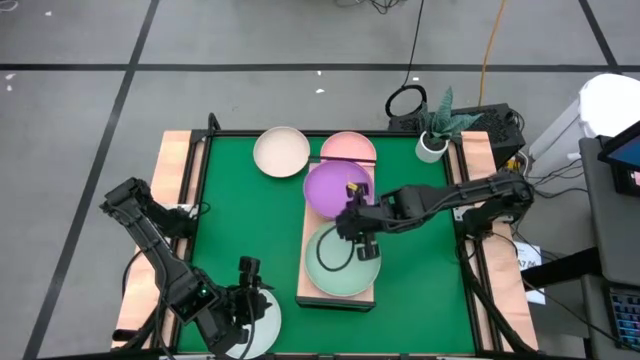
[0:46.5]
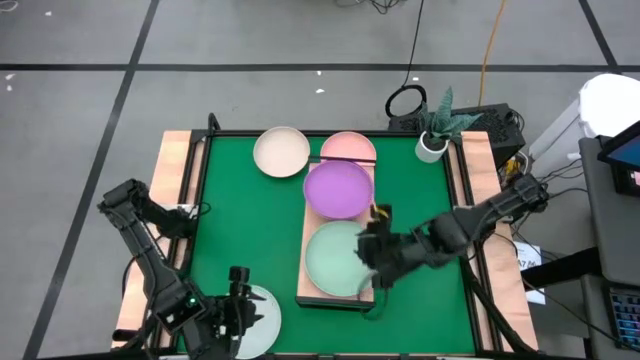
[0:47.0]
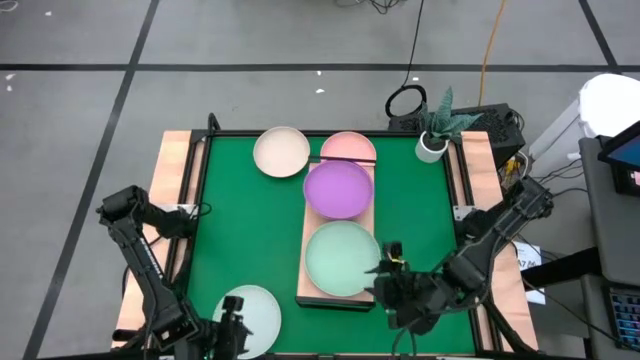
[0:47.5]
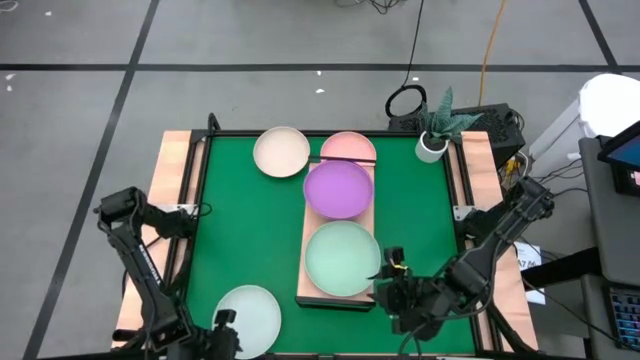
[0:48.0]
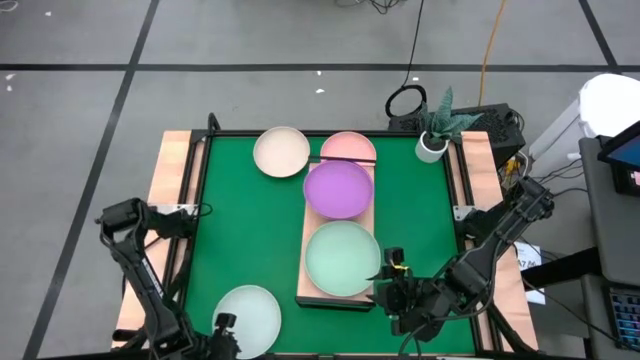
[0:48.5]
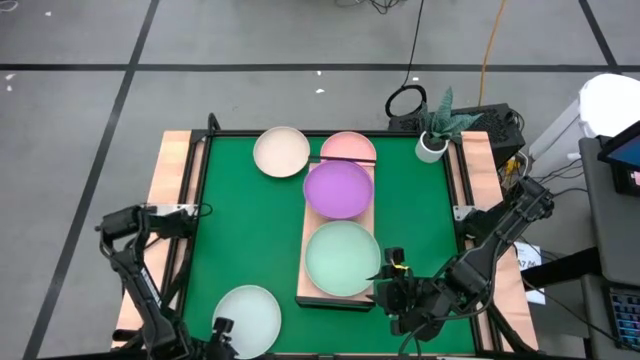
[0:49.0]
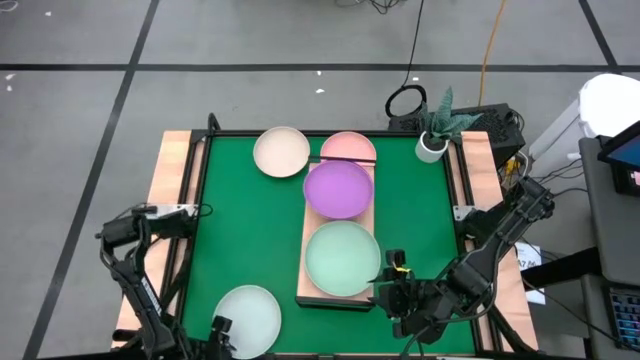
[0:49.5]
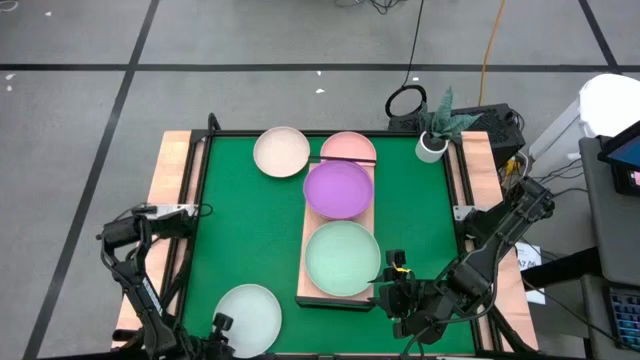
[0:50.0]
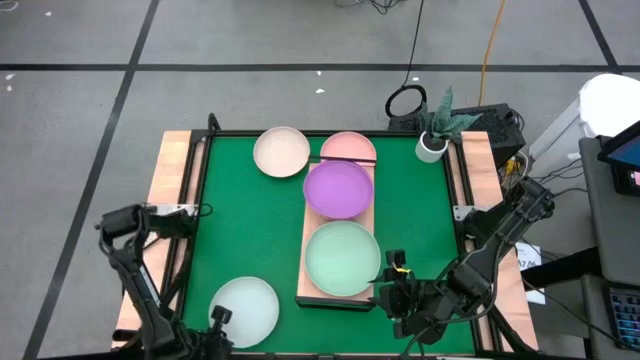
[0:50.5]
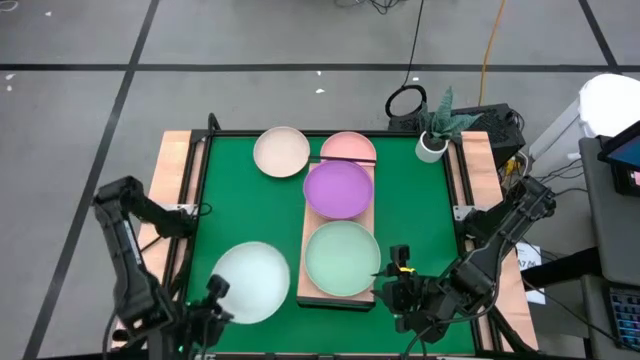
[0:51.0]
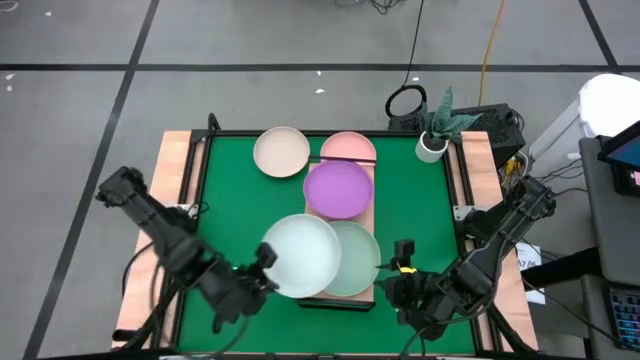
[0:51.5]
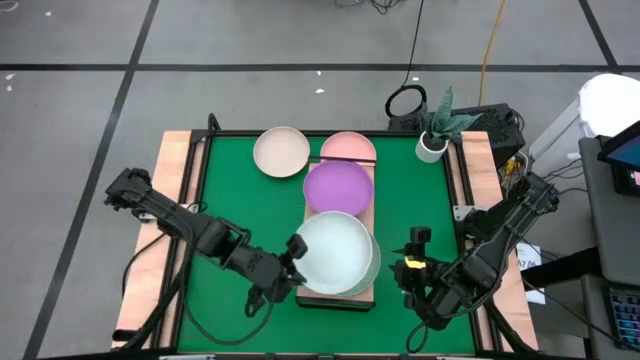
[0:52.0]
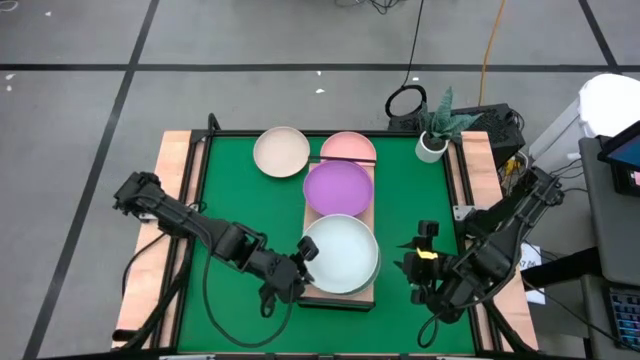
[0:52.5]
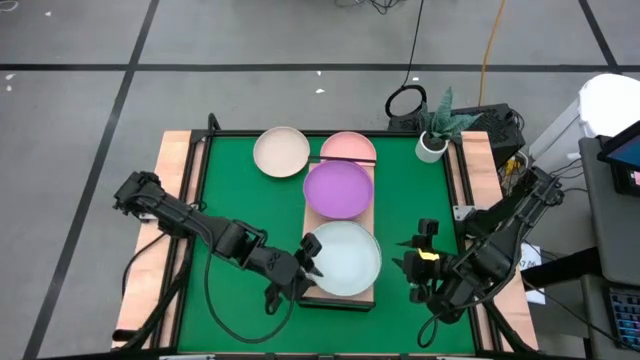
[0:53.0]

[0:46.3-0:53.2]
Task: Place and stack plates onto a shelf
Stack the grey plate on top of the light green plate on the shelf

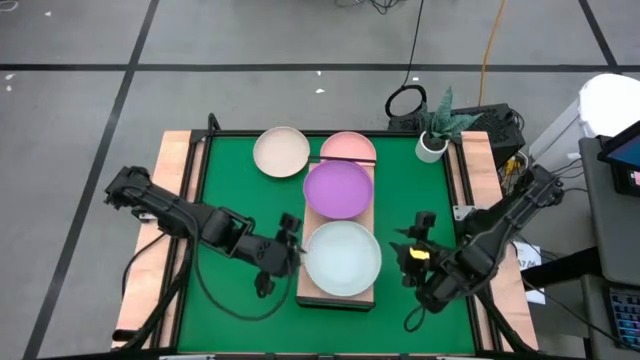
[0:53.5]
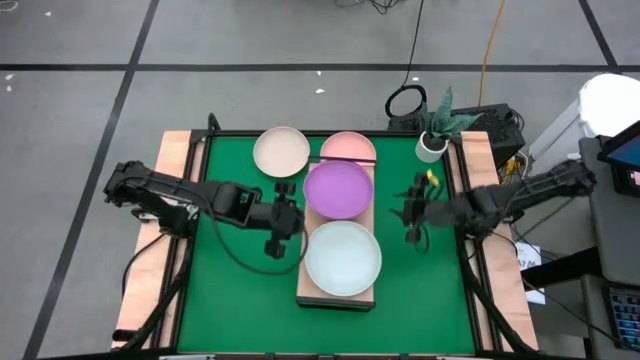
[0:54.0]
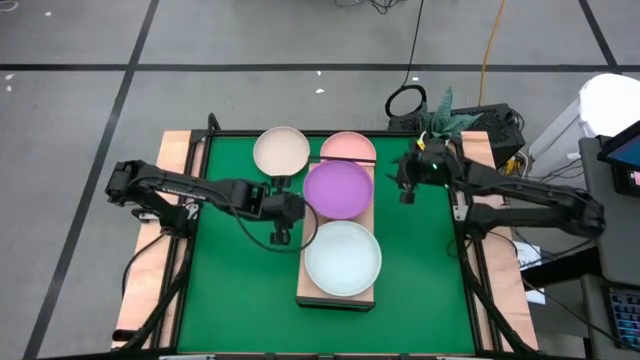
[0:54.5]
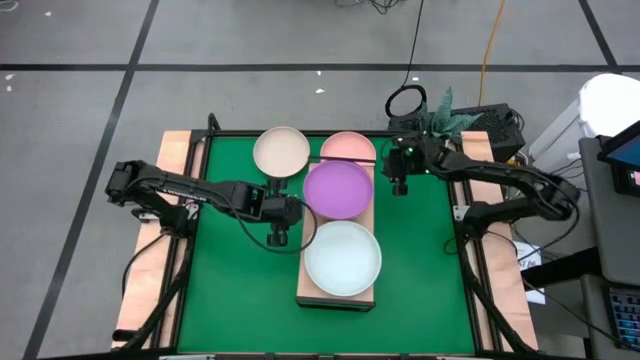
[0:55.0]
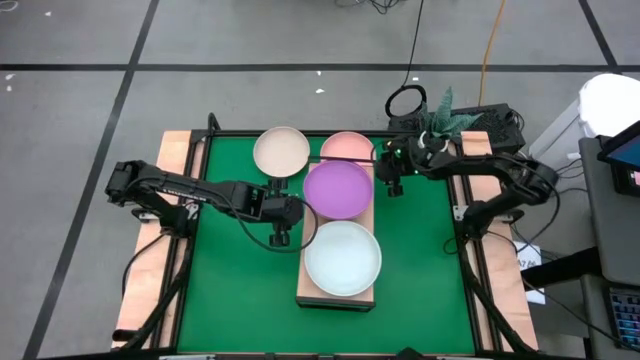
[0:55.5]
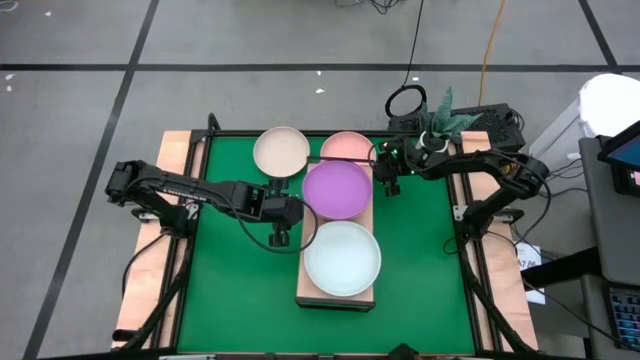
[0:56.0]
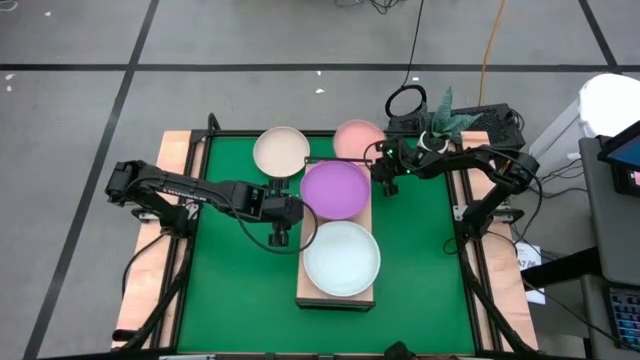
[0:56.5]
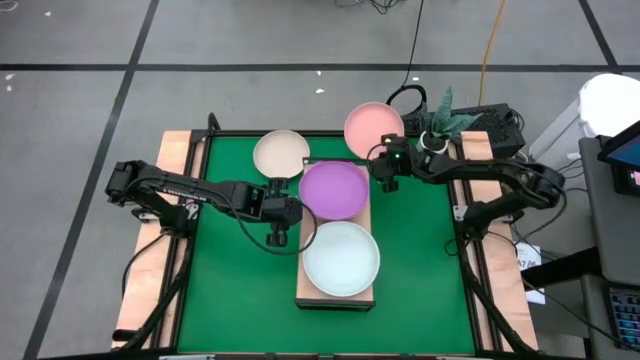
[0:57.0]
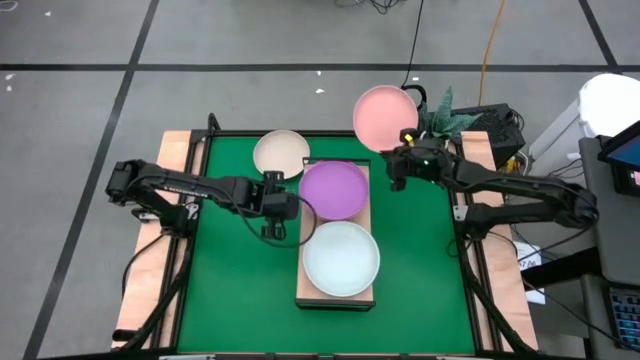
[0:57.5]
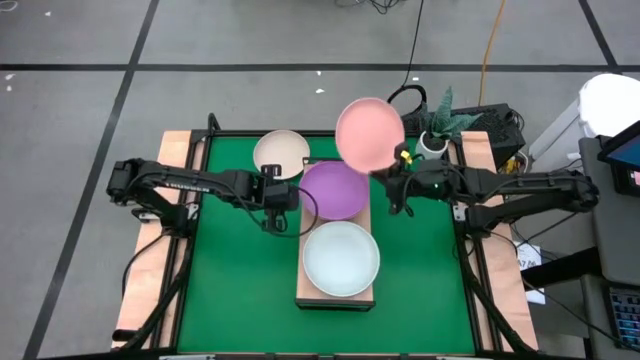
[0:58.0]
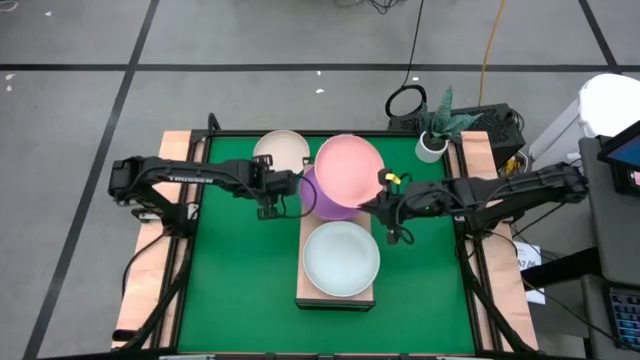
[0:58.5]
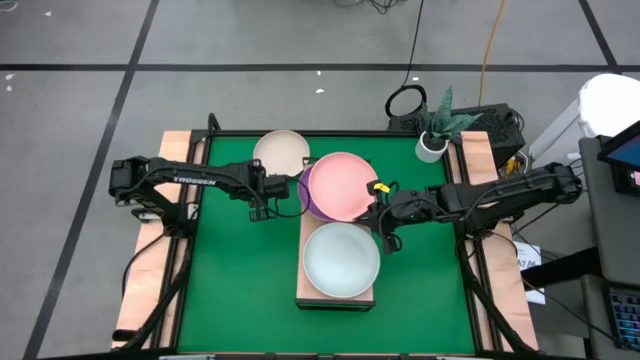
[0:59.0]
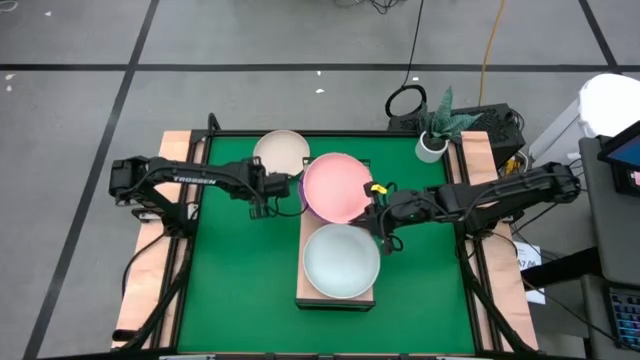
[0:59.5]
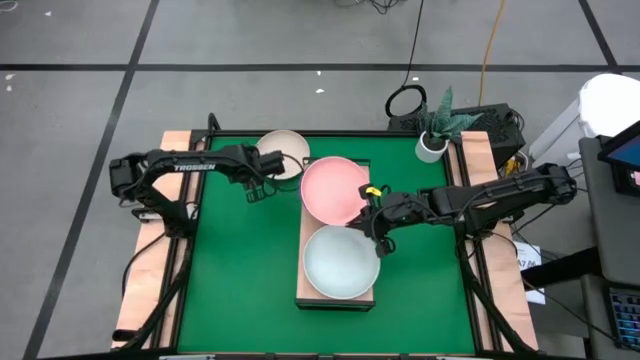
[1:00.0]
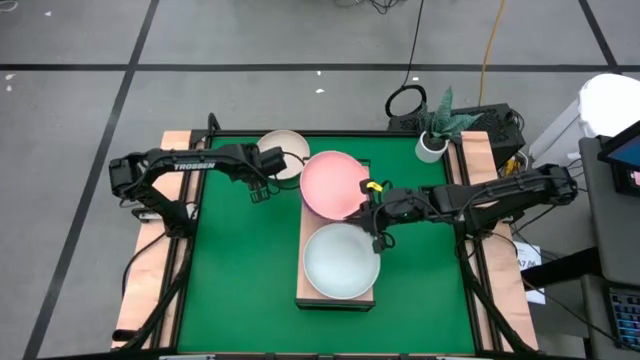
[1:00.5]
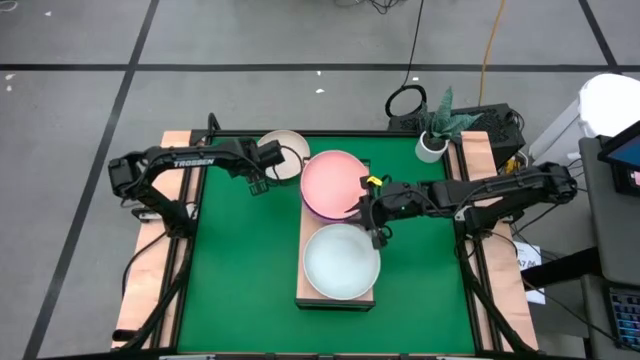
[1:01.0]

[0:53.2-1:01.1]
Stack the light orange plate on top of the purple plate on the shelf

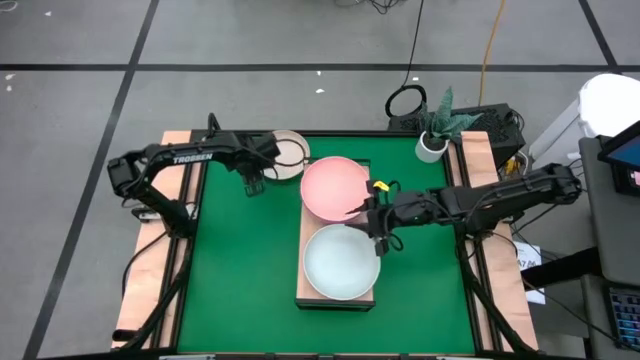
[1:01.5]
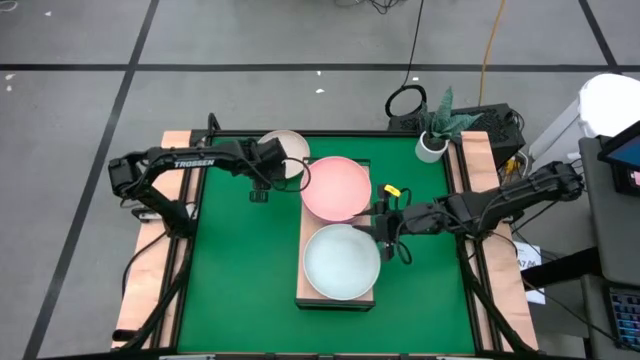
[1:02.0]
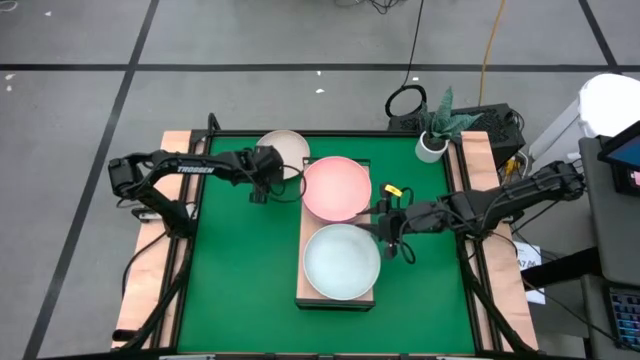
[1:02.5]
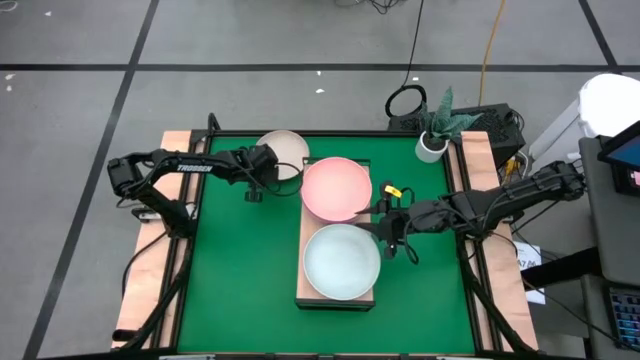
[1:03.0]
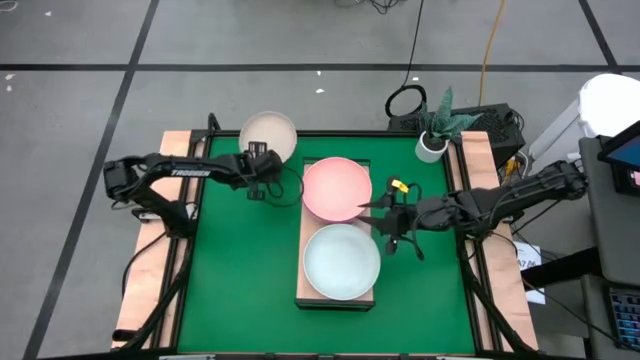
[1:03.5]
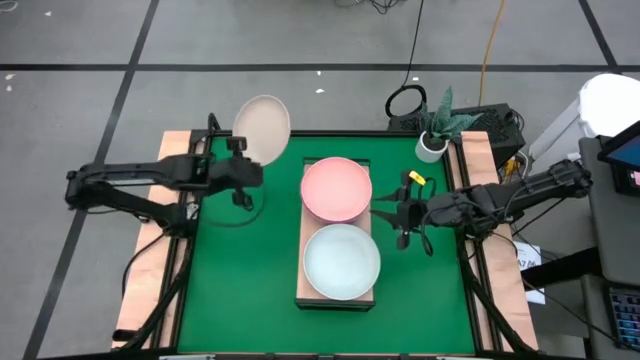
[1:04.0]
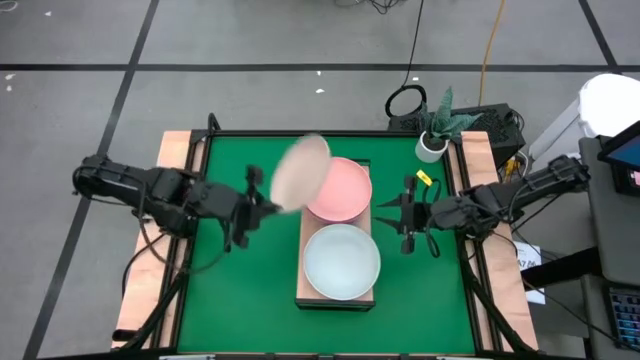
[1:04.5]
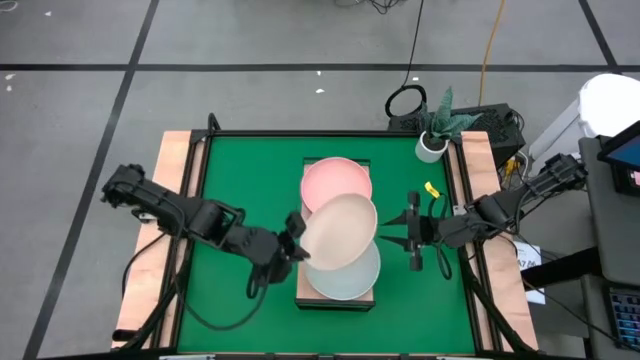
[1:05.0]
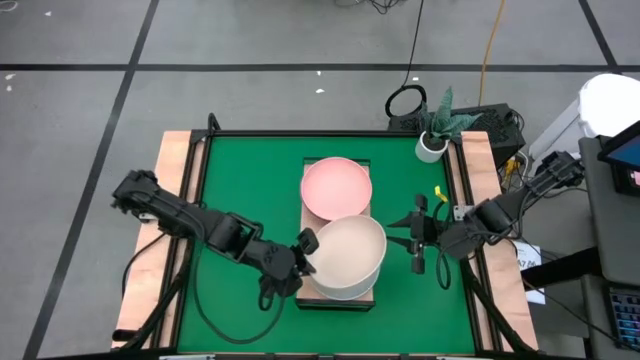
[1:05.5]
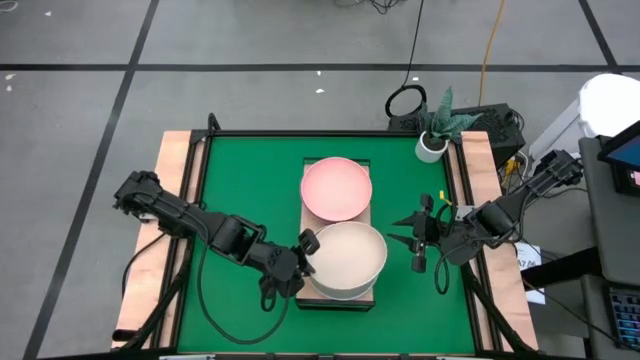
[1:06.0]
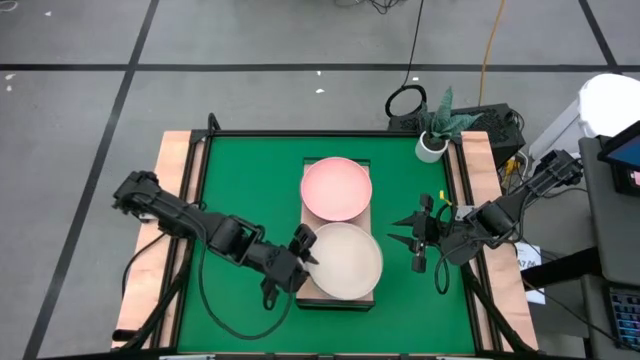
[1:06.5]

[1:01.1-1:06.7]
Stack the white plate on top of the grey plate on the shelf

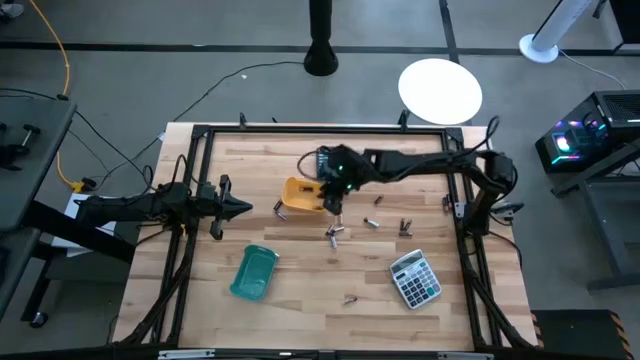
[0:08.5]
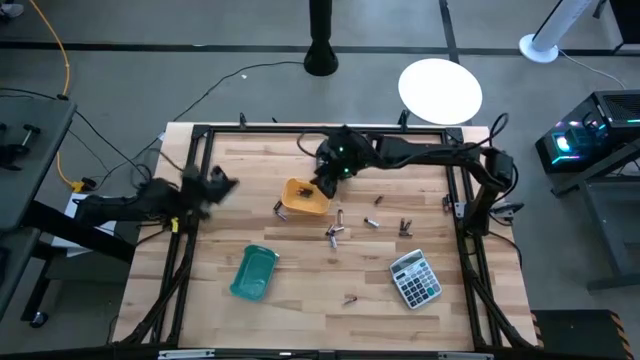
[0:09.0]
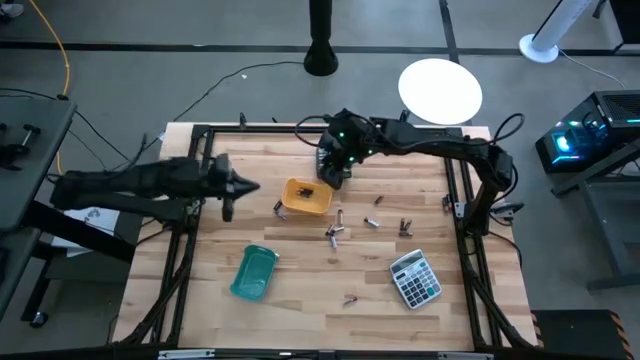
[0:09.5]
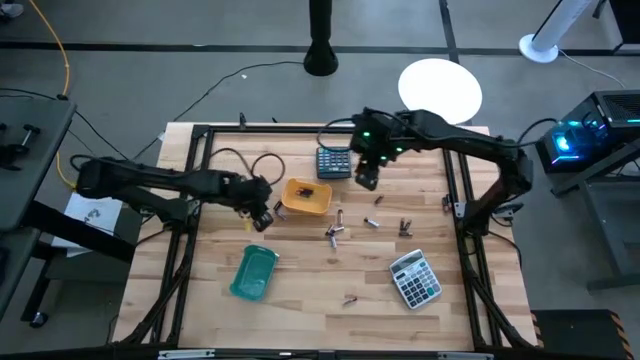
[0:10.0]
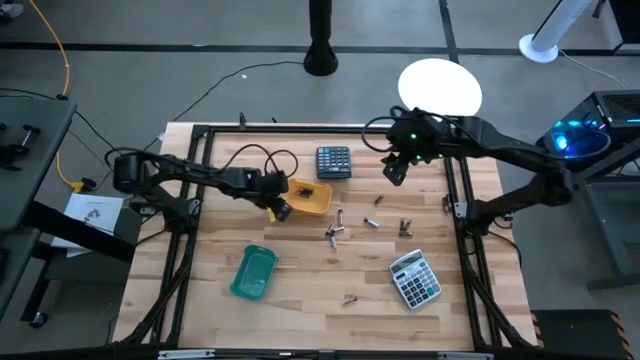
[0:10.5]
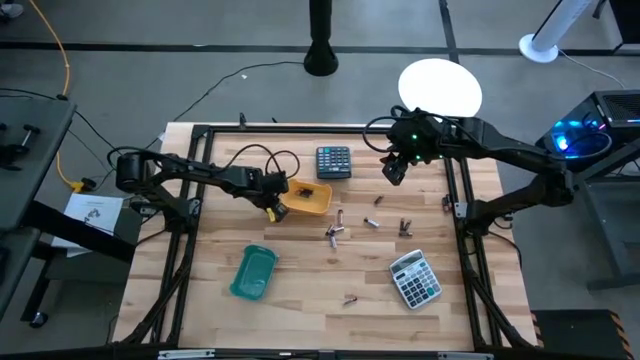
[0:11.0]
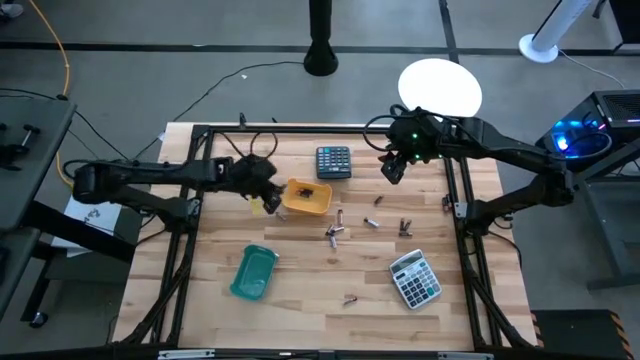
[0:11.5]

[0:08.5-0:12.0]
Task: Sort batteries
Put the black battery into the yellow bin
